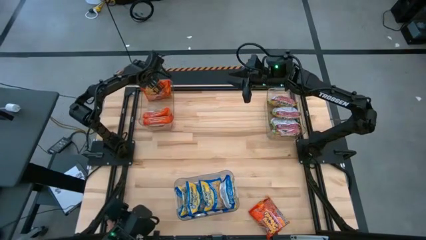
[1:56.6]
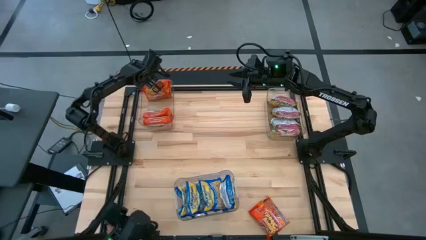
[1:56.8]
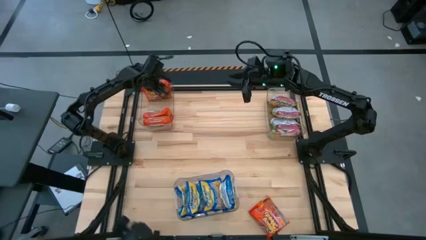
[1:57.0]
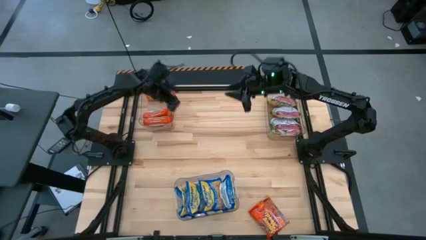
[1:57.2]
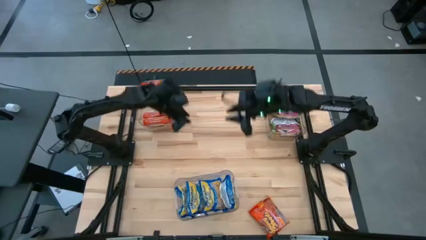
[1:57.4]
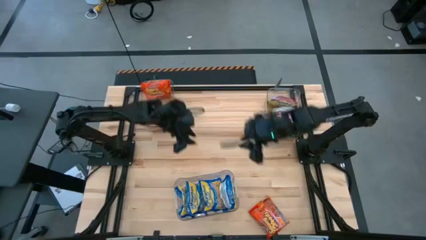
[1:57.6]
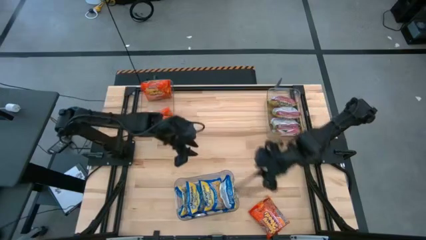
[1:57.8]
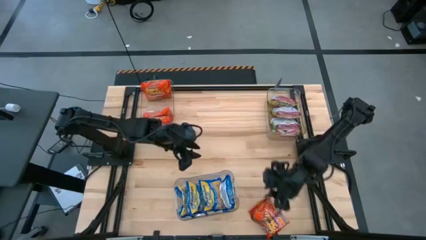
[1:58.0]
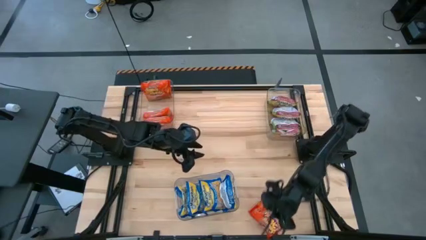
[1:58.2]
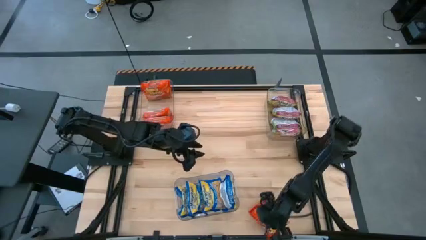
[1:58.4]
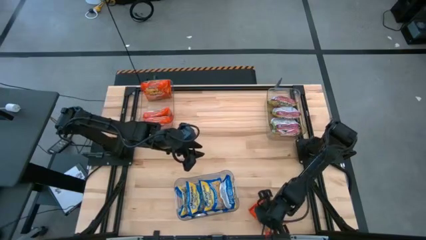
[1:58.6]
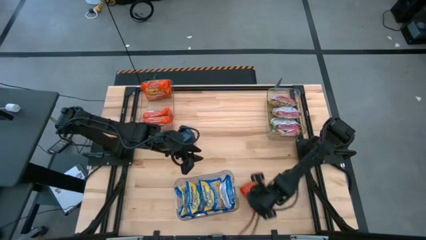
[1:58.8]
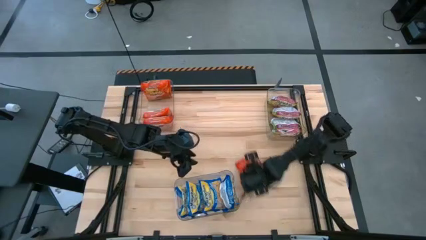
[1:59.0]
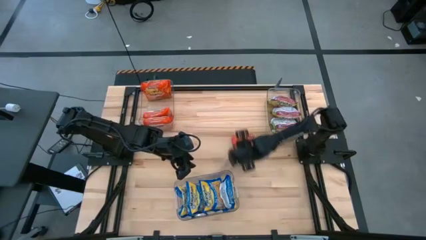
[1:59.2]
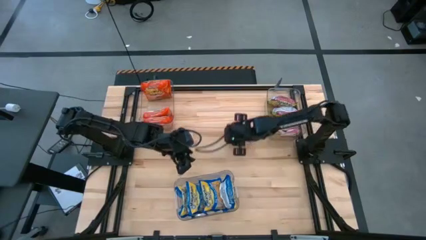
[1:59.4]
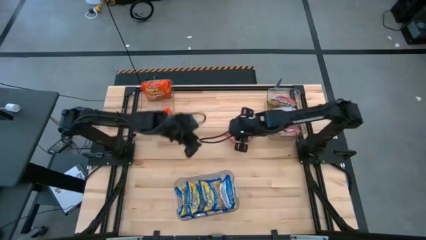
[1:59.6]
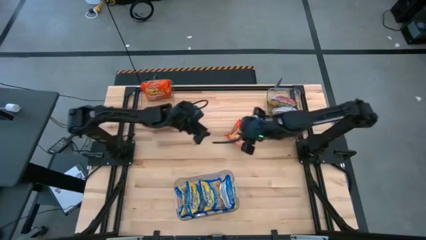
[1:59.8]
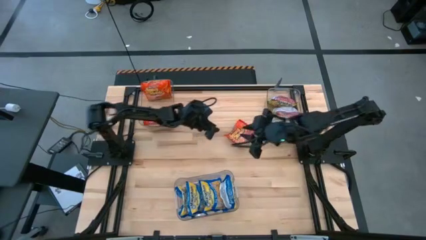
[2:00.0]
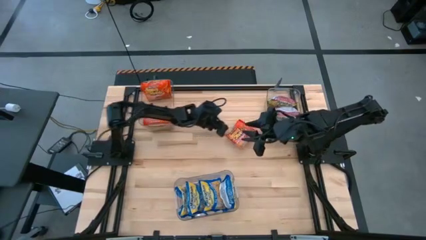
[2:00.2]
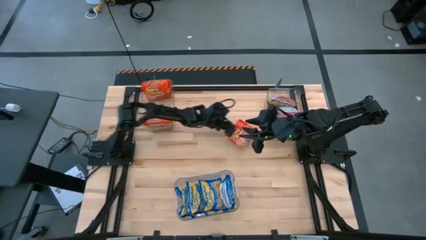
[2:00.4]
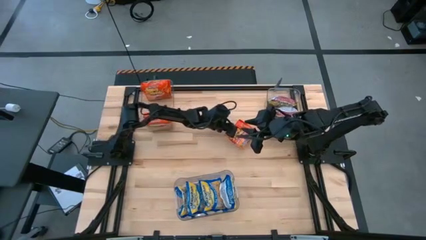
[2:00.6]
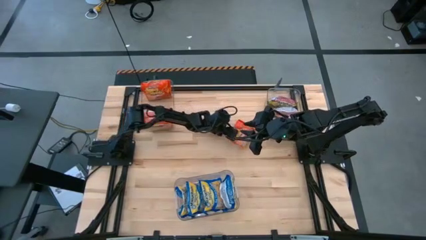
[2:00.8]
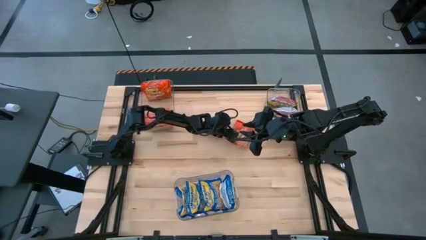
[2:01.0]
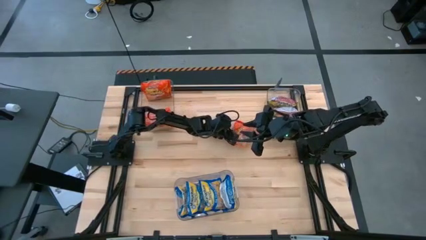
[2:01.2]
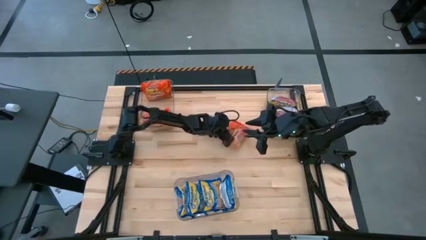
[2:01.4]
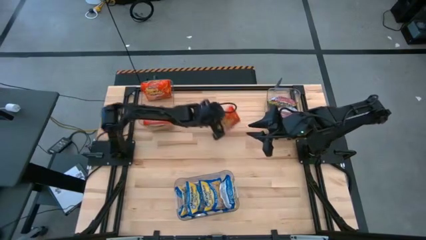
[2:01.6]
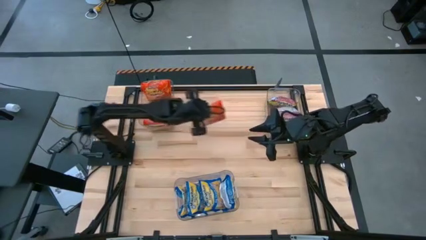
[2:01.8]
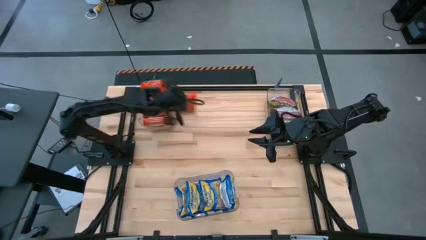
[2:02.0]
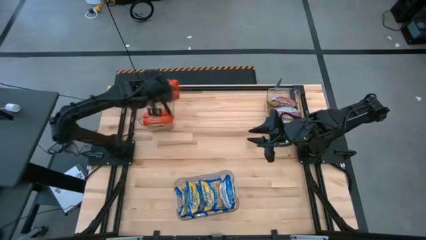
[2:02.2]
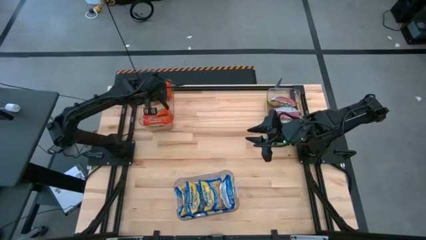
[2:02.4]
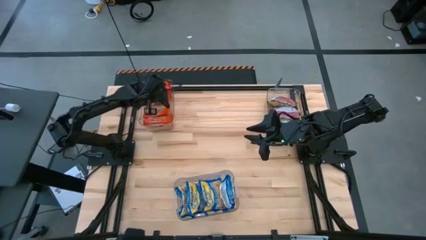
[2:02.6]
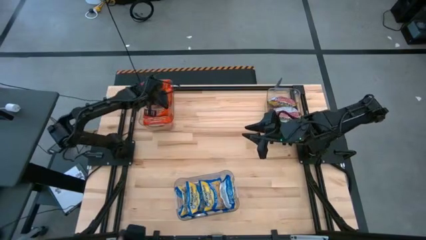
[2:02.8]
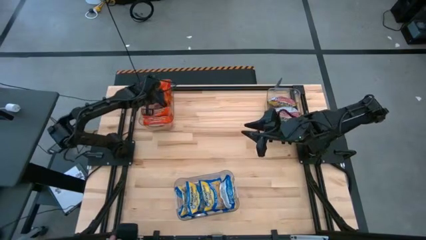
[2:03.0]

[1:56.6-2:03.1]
Task: Sort Maruchan noodles
Put the orange noodle pack into the top left transparent bin

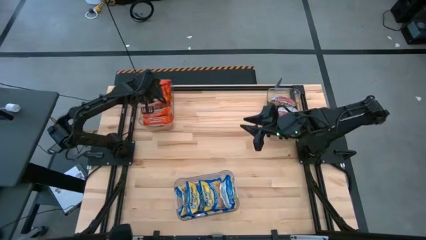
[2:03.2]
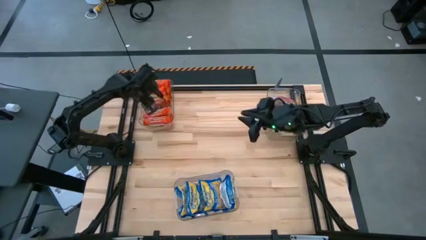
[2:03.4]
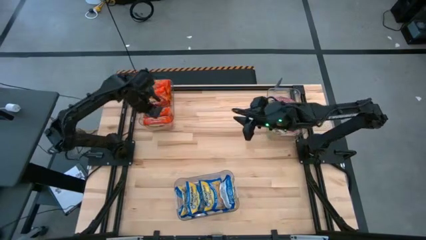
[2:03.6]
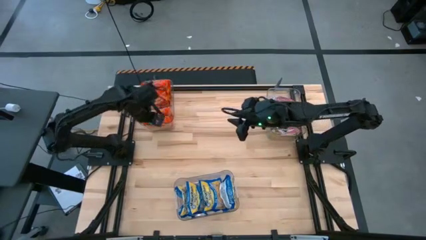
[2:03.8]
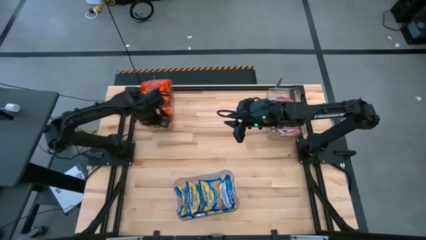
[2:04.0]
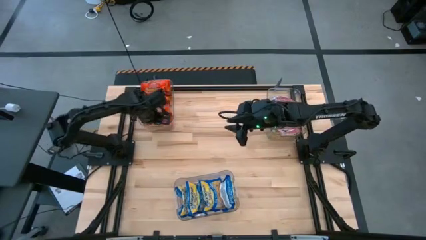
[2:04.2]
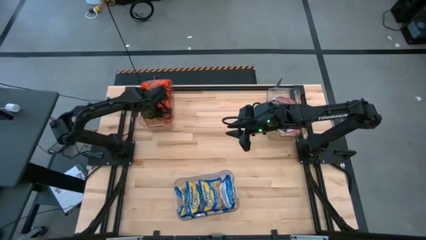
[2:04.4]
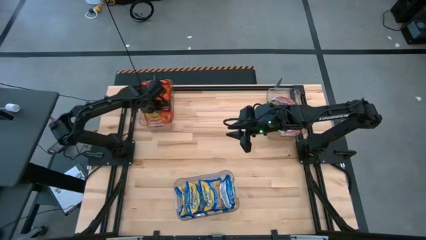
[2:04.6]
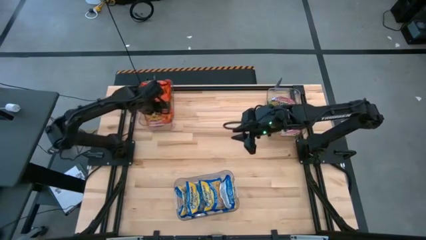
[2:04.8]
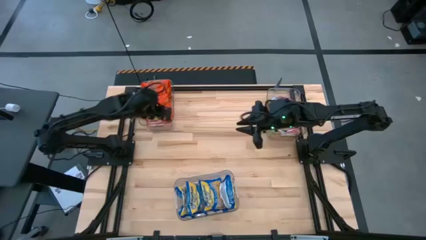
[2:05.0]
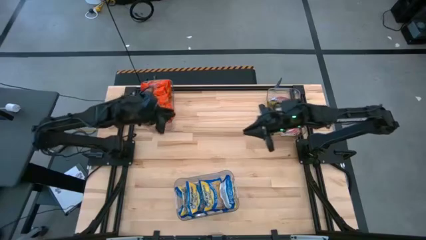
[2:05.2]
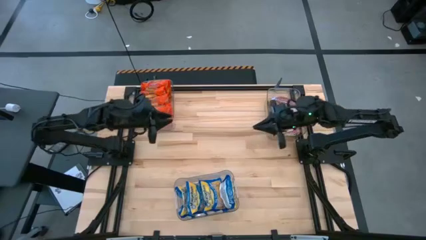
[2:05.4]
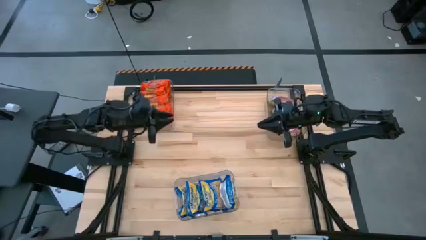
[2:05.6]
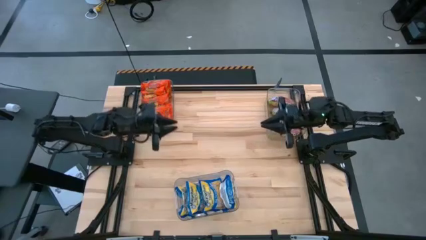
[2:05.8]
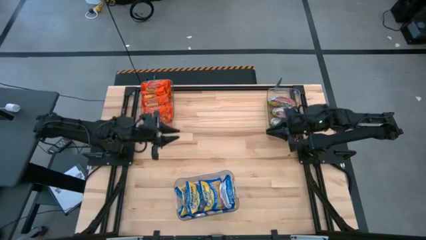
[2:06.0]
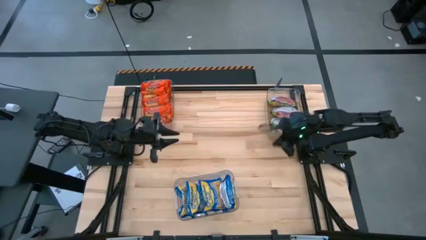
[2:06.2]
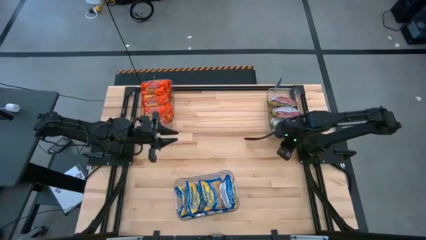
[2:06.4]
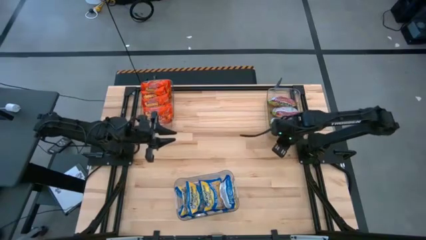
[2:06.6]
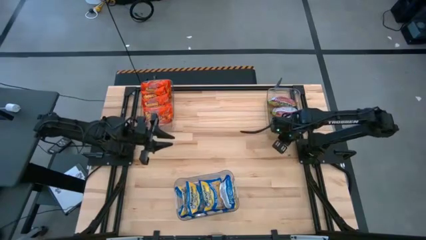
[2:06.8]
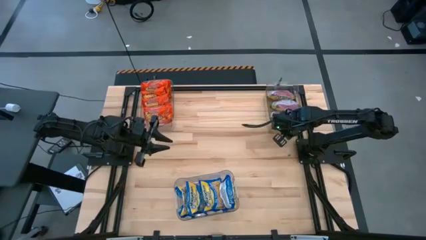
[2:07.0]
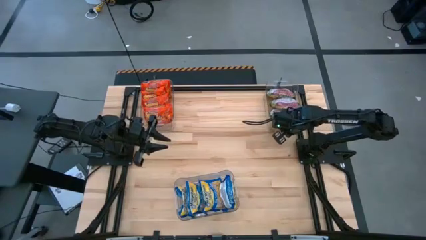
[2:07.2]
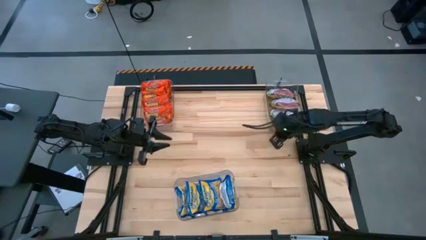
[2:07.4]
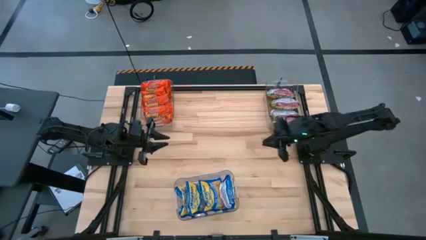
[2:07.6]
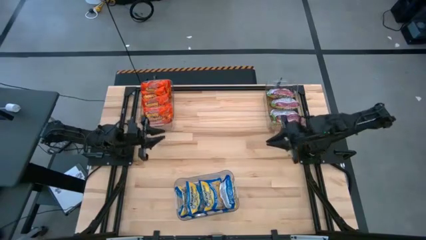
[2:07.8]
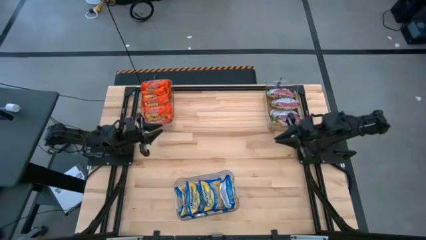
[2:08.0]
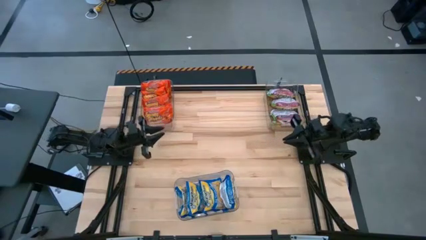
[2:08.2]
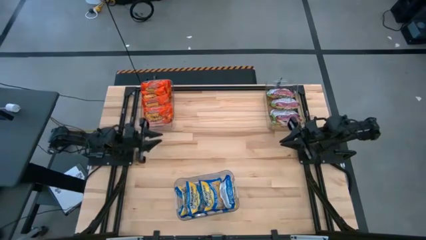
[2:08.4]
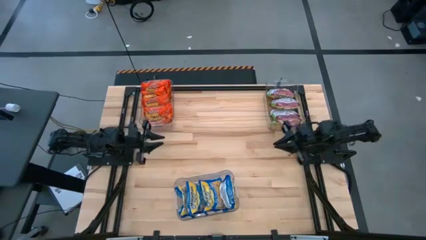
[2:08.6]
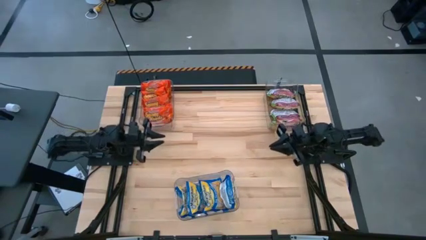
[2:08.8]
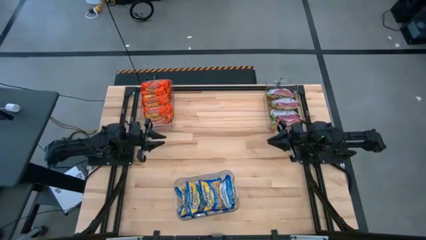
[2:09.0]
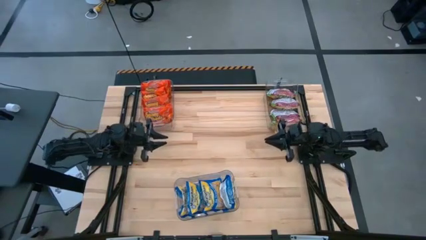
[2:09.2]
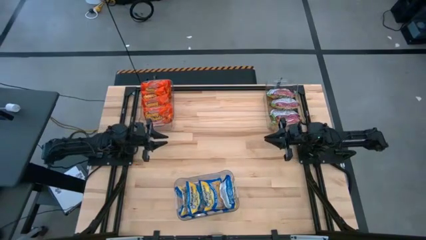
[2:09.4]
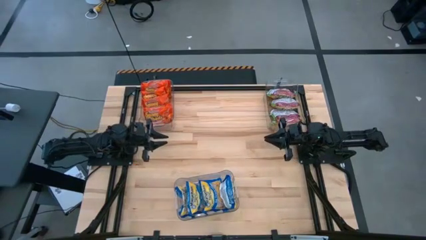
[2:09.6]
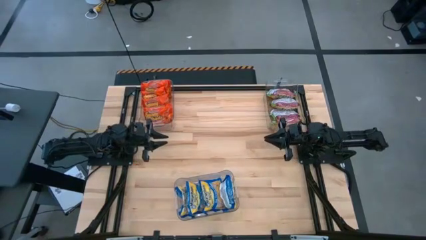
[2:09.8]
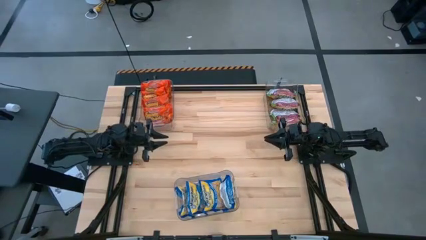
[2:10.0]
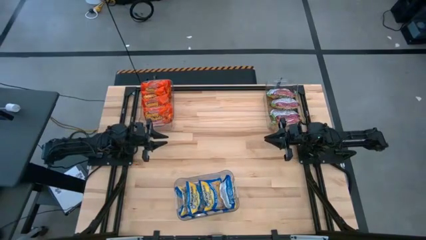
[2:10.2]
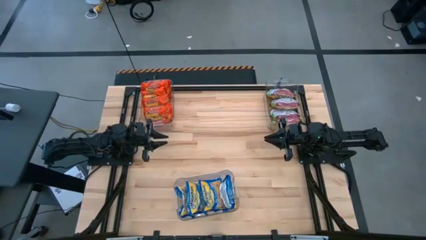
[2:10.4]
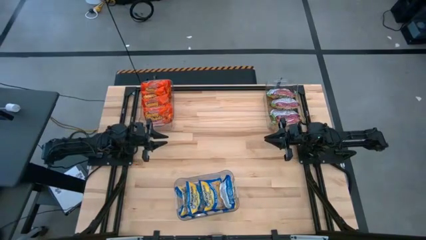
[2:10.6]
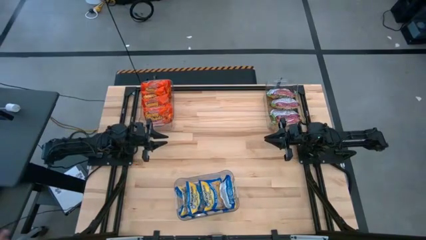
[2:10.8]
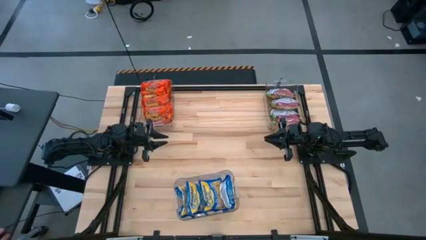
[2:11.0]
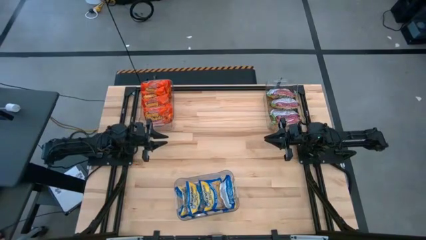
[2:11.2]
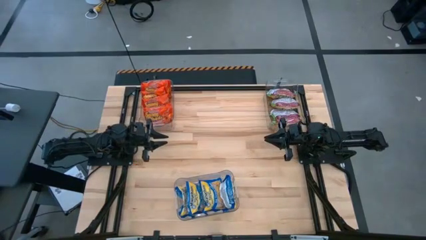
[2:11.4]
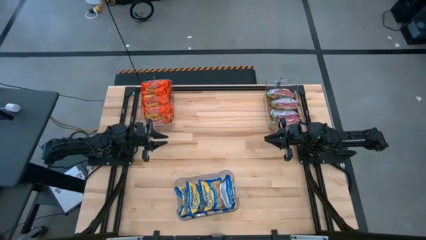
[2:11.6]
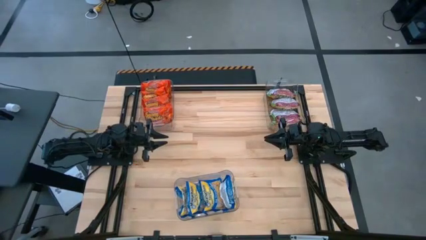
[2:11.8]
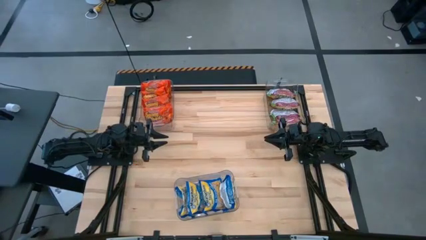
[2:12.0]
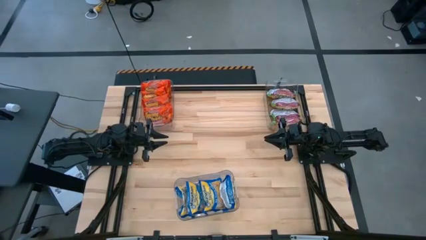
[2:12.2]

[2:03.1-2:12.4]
Return to Home Position

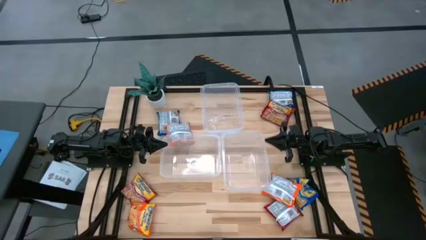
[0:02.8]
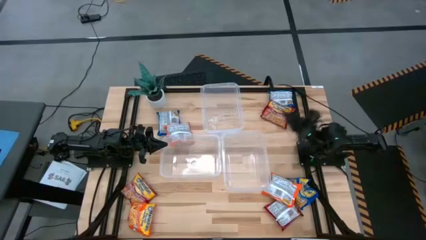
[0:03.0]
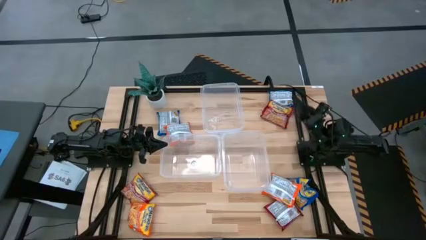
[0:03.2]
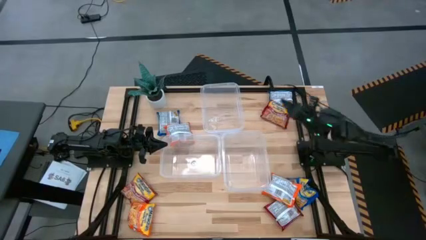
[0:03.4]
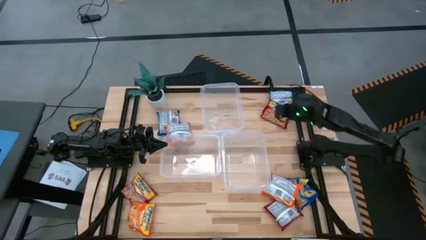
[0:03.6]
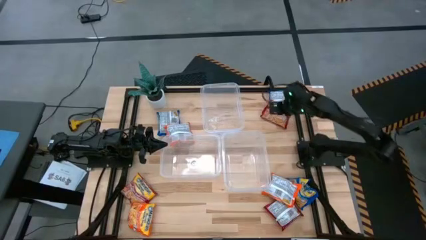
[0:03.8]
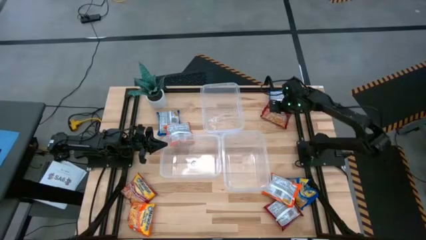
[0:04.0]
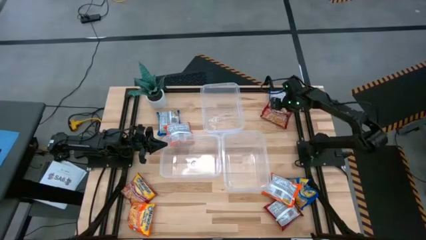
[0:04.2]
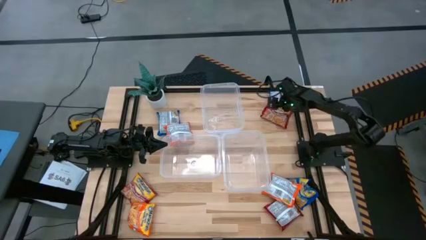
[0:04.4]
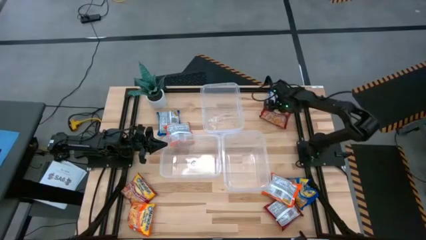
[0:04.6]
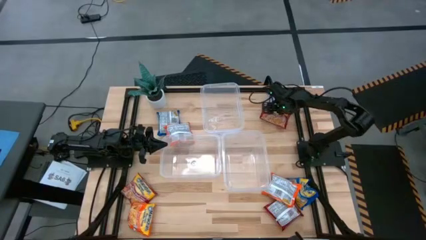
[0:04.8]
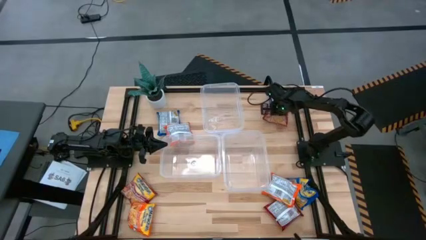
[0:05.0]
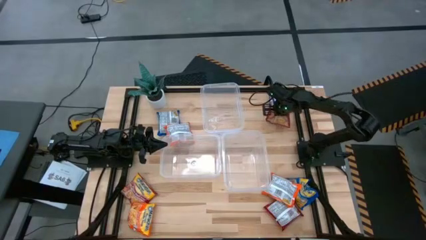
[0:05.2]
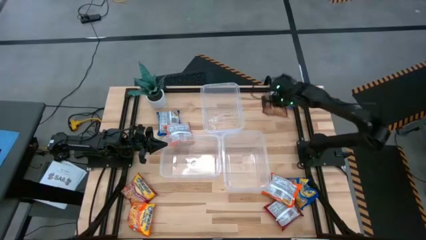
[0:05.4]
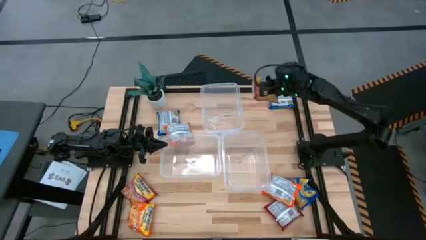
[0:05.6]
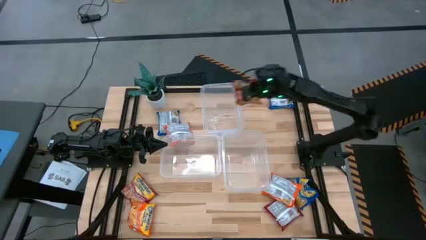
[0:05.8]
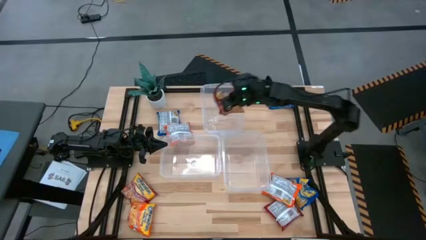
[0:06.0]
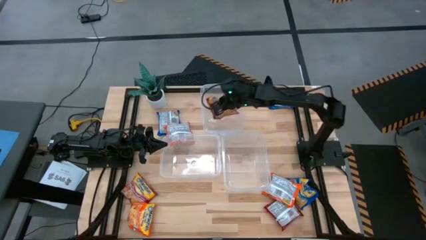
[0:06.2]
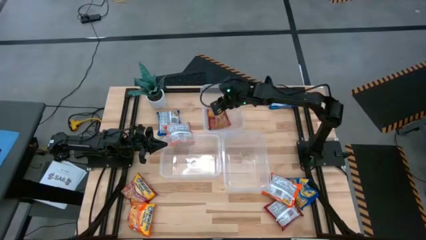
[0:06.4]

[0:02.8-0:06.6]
Task: Sort Maruchan noodles
Put the top red noodle pack into the top transparent bin
